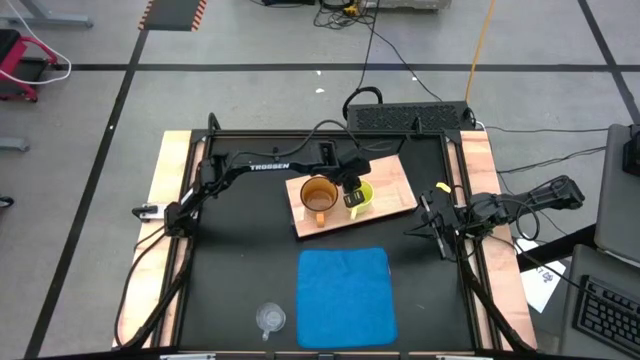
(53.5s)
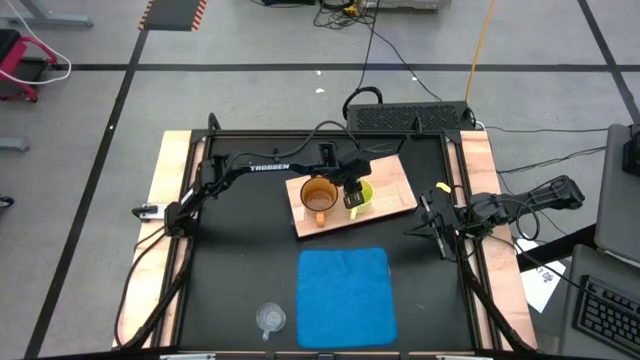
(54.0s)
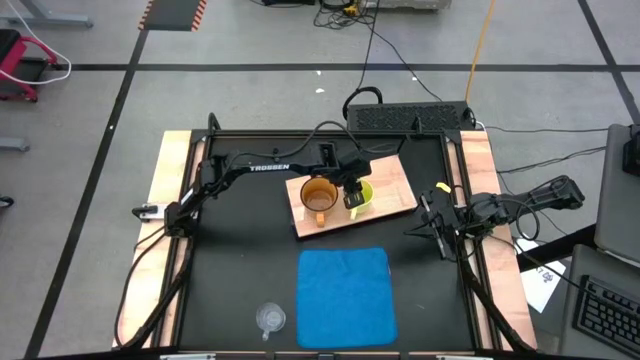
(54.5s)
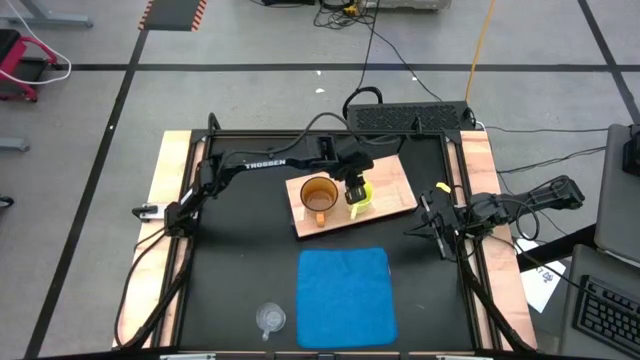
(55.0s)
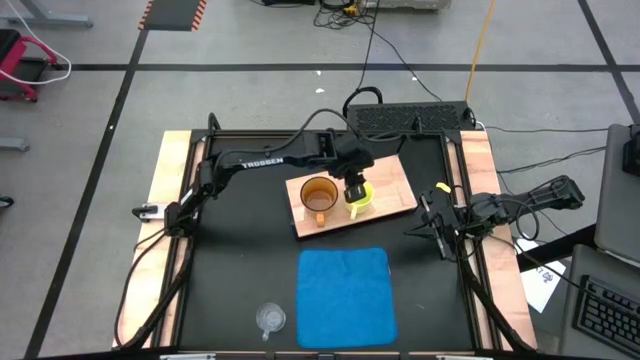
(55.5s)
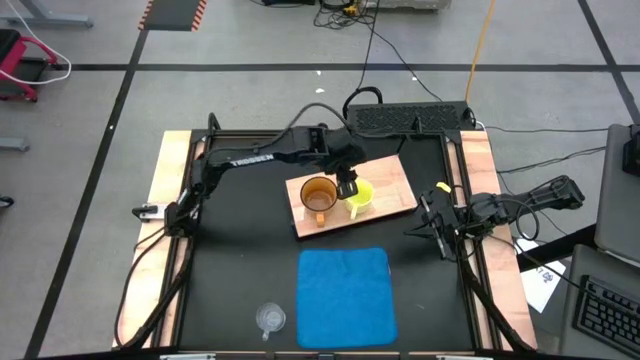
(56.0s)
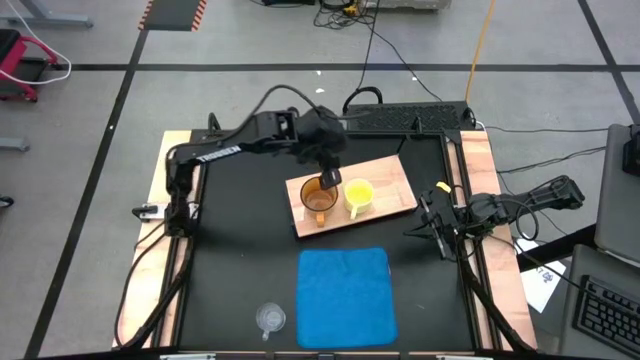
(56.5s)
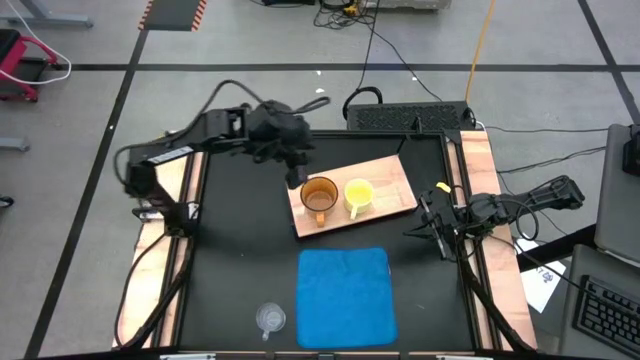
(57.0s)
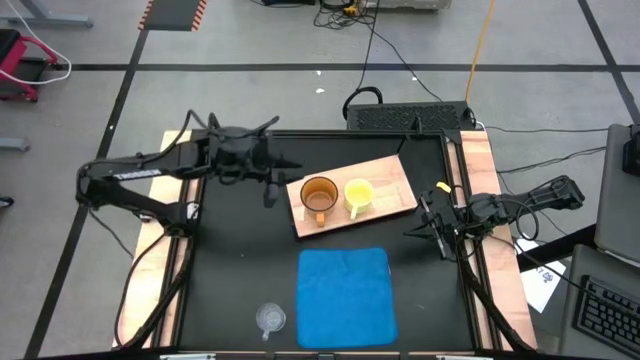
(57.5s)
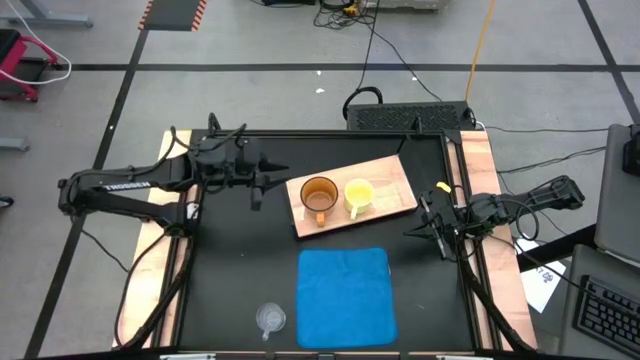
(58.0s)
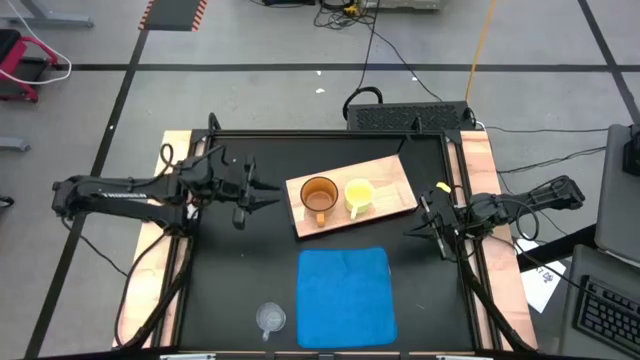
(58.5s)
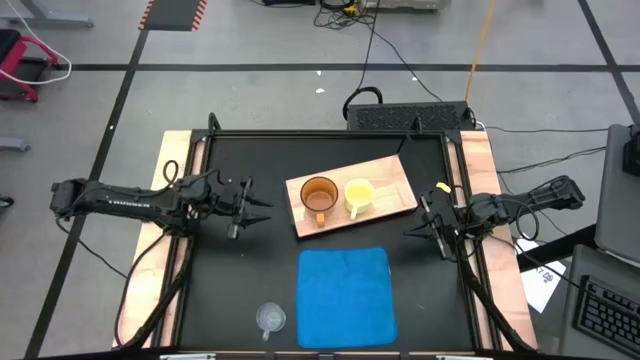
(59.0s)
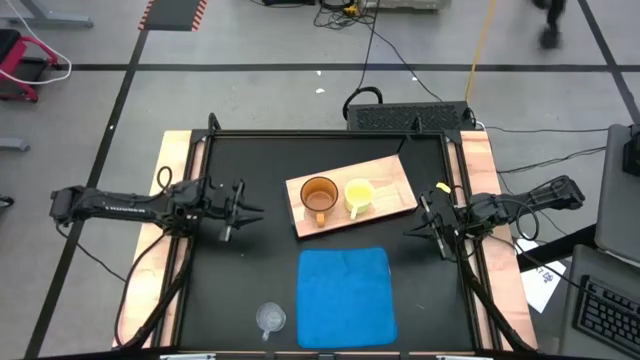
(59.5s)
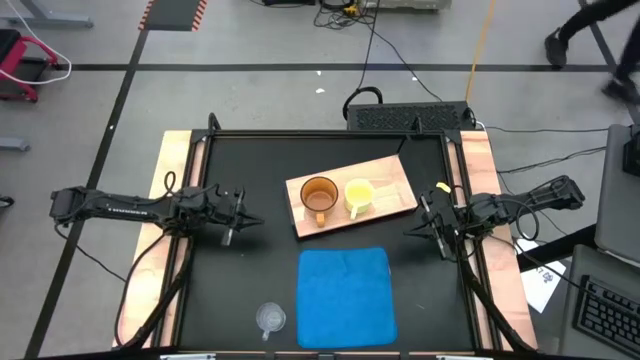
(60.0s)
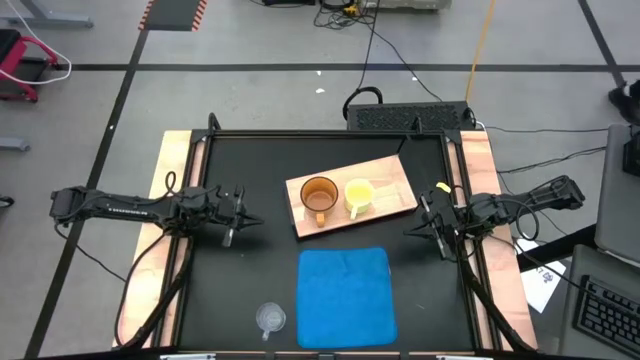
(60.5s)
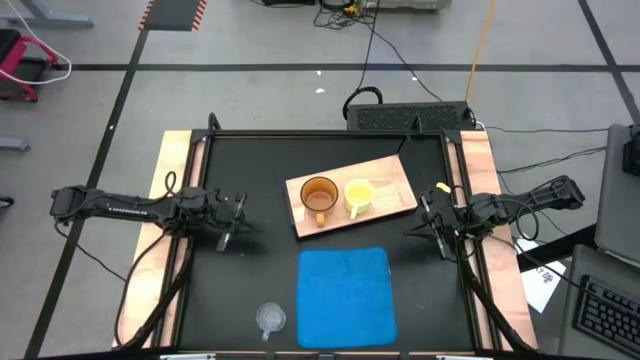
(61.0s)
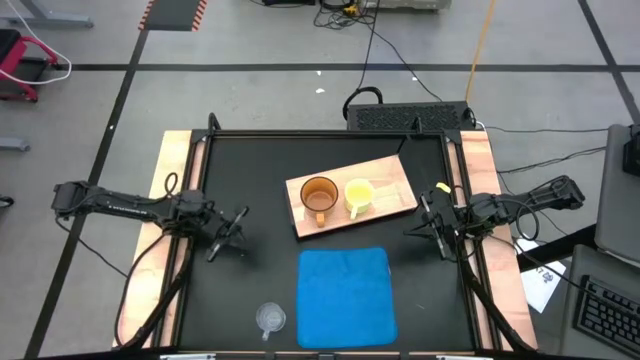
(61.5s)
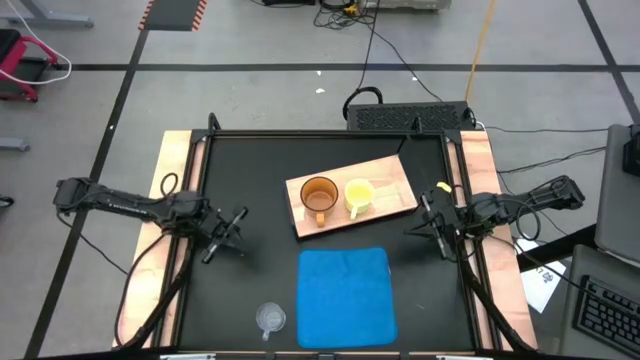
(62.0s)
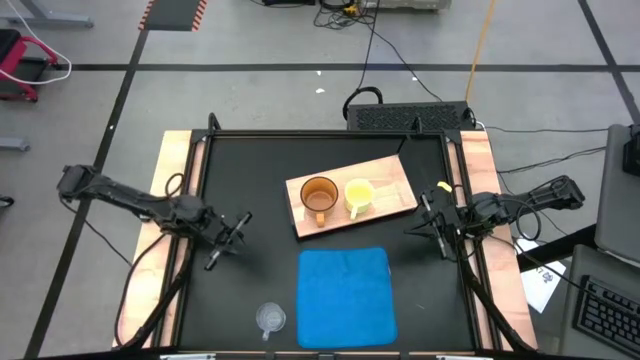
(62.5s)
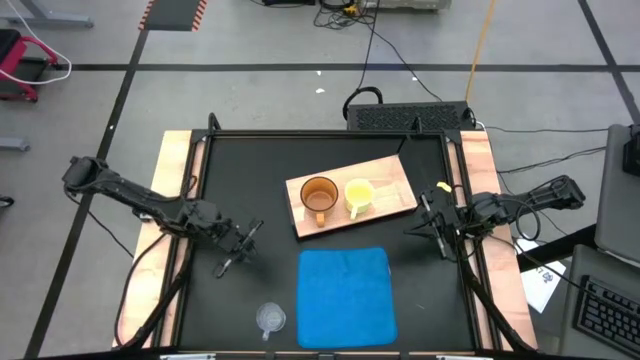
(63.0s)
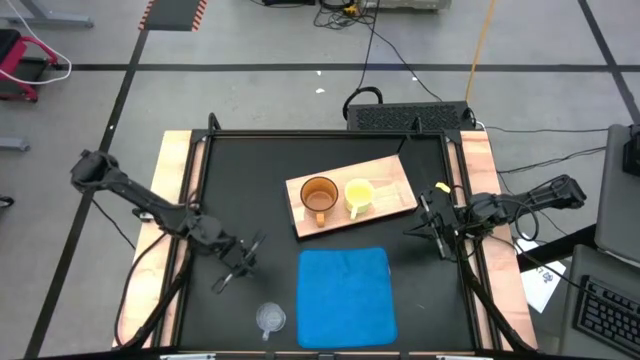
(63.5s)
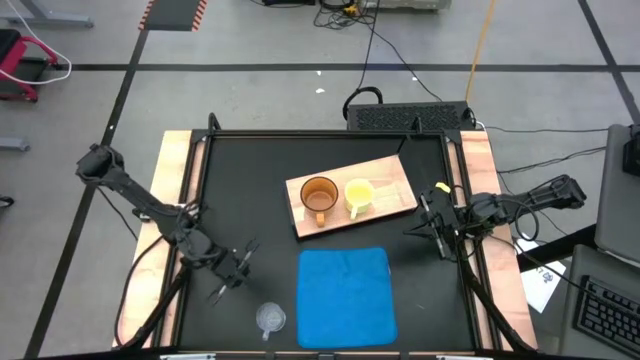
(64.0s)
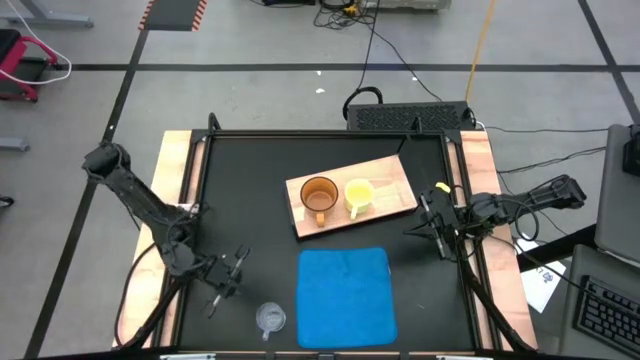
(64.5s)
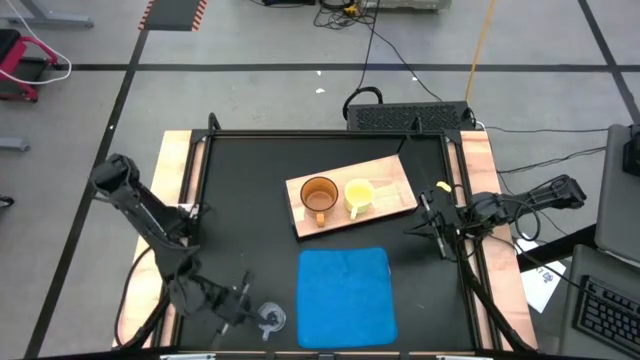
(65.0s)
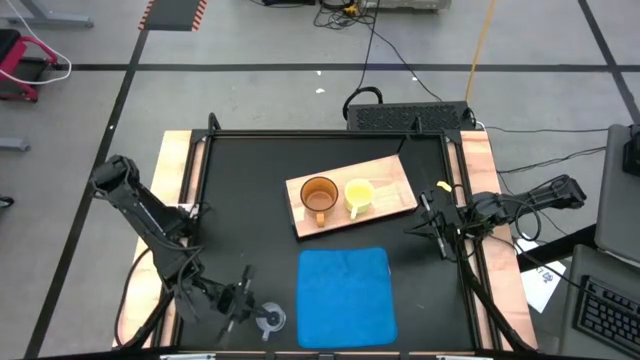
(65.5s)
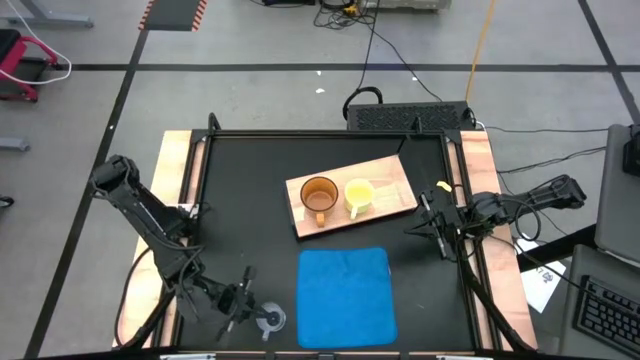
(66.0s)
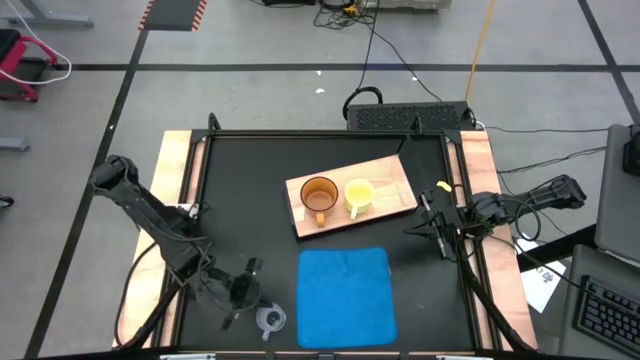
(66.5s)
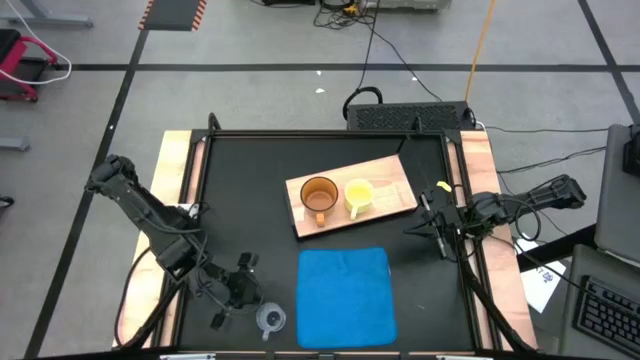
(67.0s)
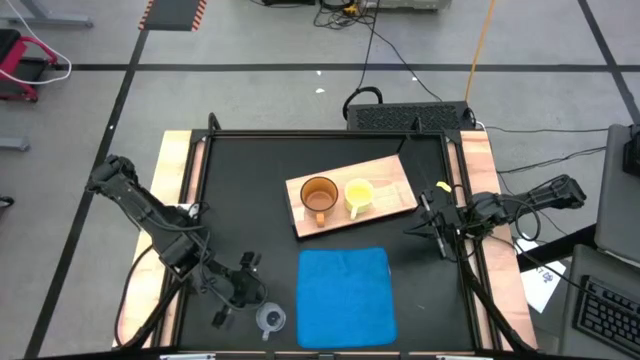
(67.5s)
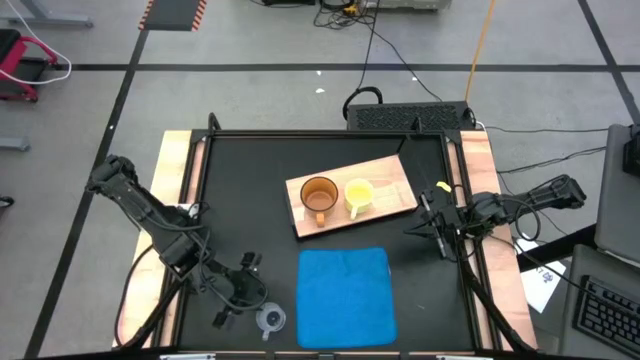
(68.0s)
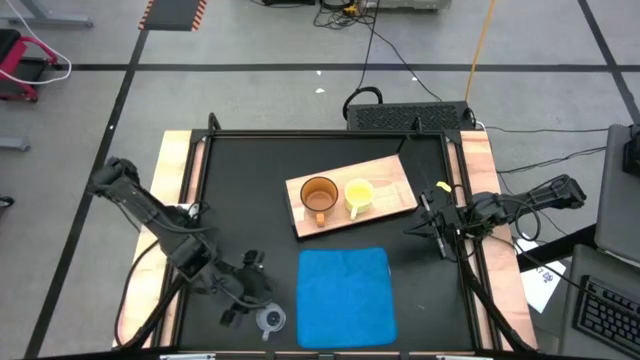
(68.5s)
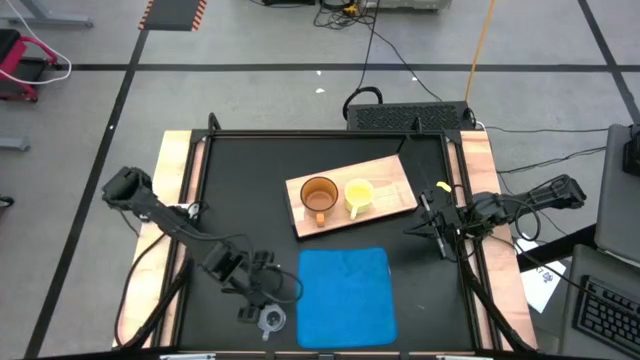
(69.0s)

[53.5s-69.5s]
Task: Stack small to large cups/mugs on shelf
Put the transparent mug on the shelf
